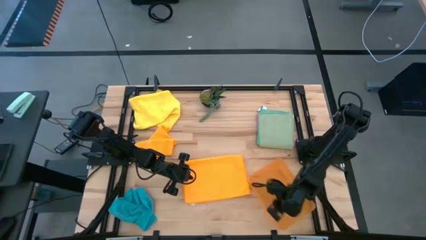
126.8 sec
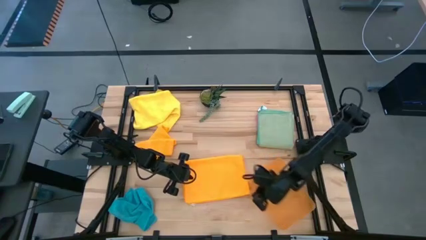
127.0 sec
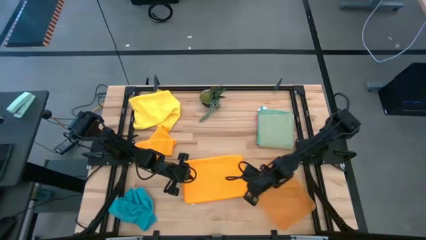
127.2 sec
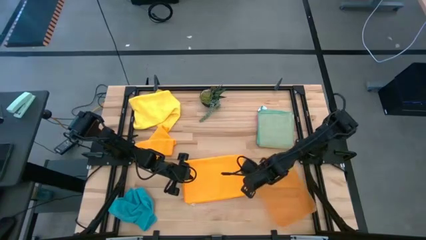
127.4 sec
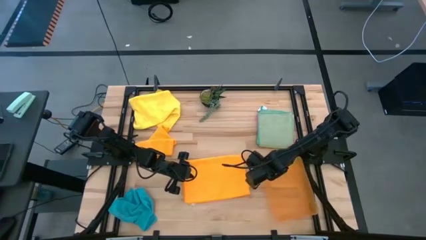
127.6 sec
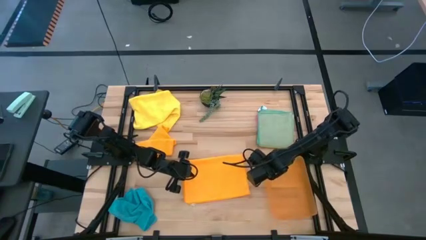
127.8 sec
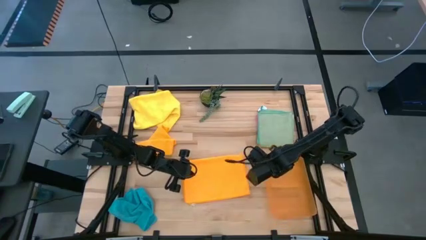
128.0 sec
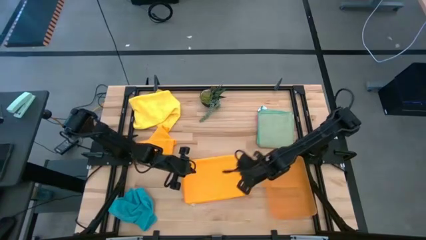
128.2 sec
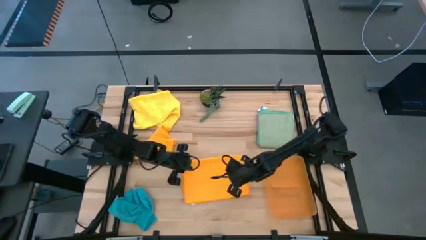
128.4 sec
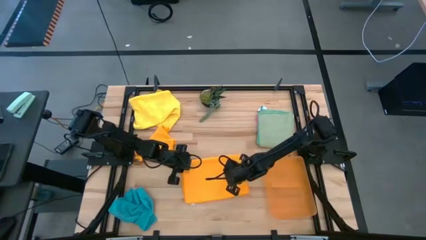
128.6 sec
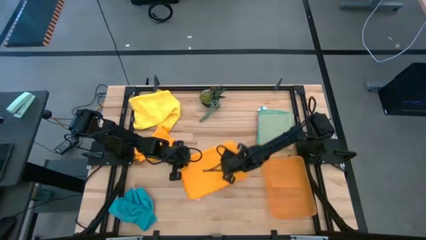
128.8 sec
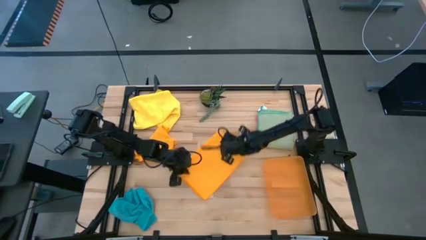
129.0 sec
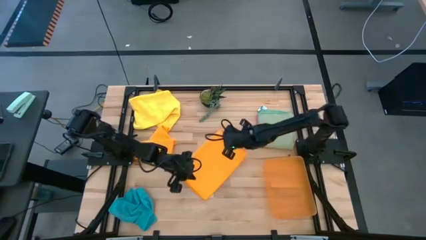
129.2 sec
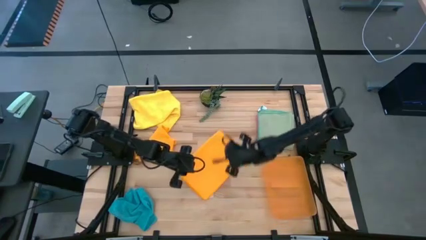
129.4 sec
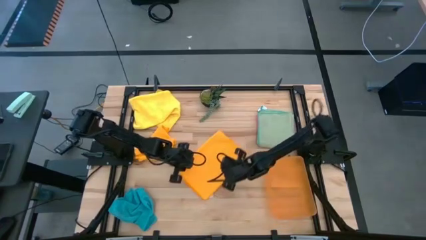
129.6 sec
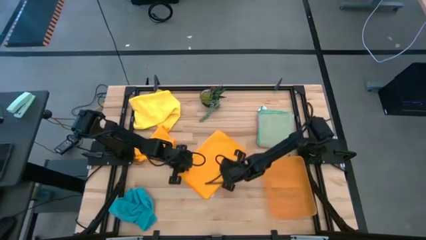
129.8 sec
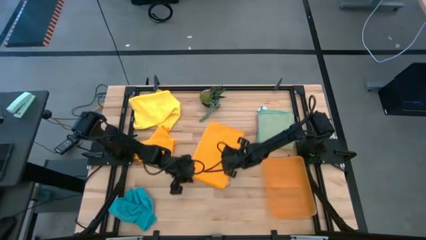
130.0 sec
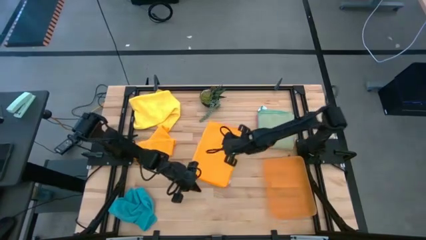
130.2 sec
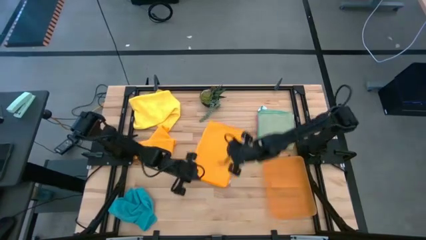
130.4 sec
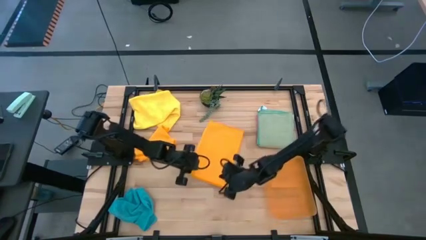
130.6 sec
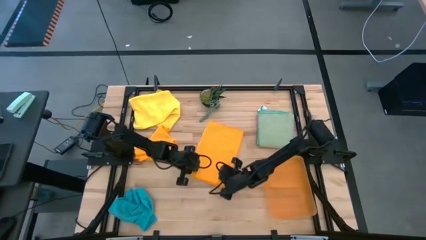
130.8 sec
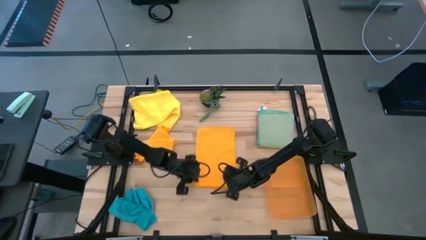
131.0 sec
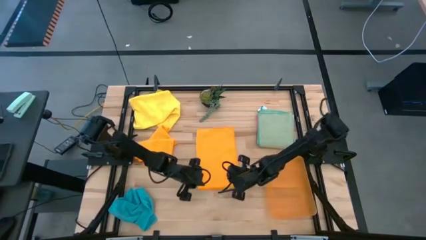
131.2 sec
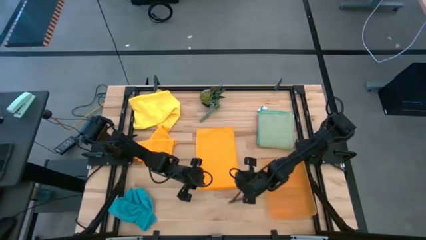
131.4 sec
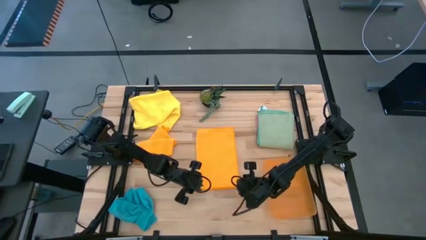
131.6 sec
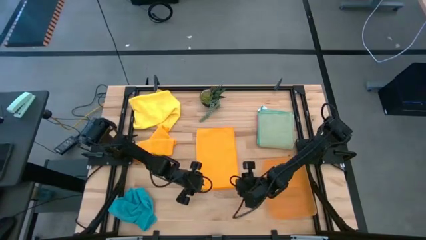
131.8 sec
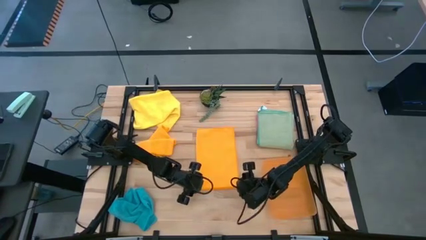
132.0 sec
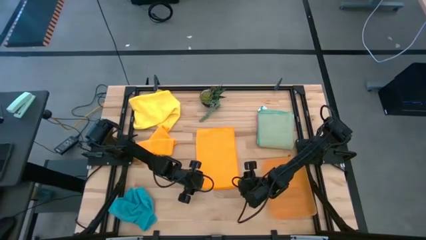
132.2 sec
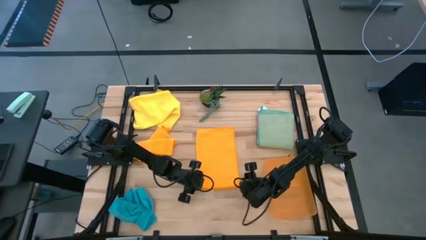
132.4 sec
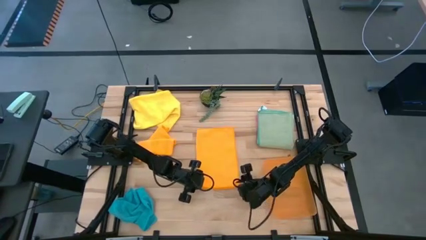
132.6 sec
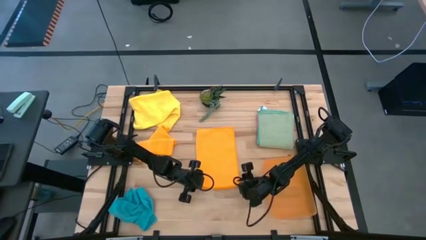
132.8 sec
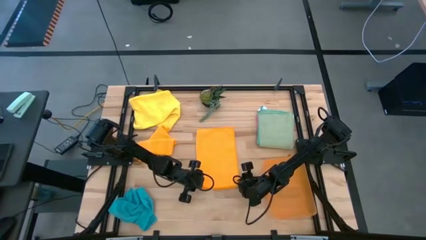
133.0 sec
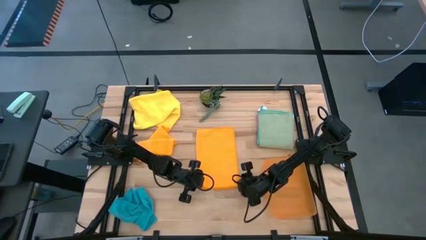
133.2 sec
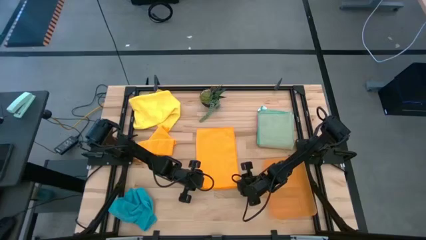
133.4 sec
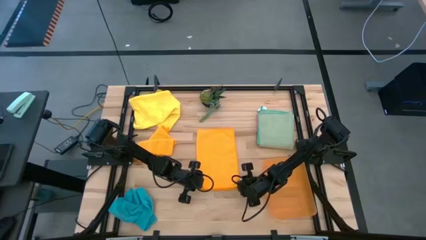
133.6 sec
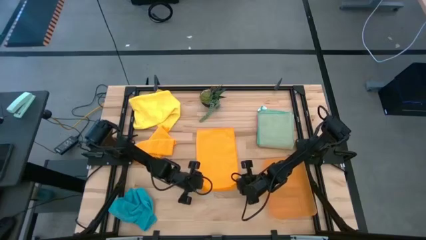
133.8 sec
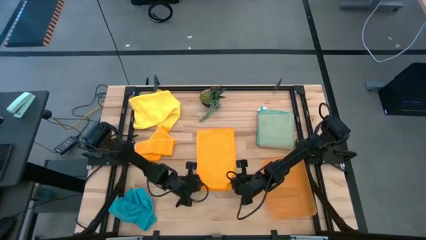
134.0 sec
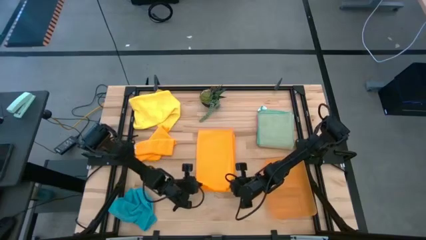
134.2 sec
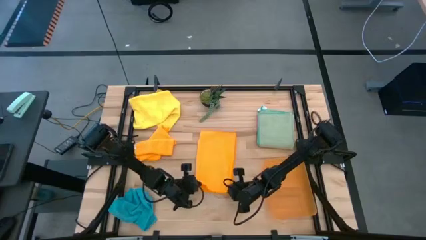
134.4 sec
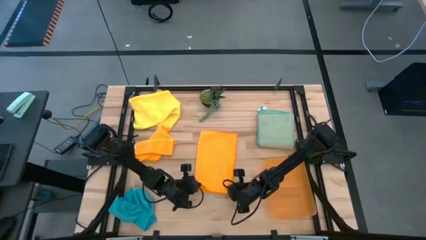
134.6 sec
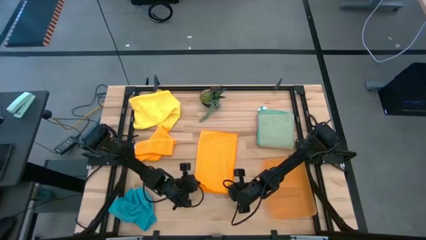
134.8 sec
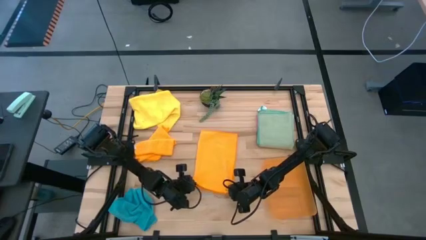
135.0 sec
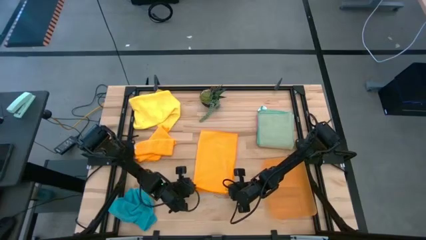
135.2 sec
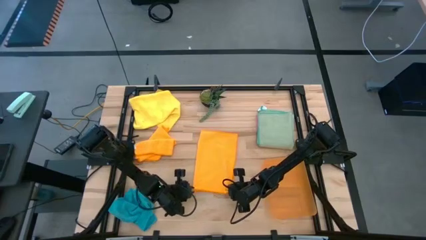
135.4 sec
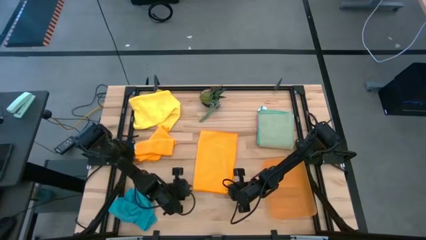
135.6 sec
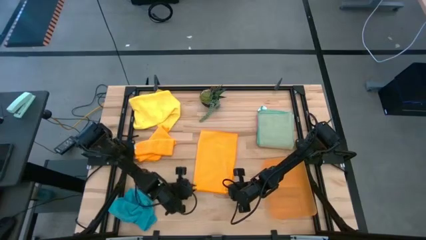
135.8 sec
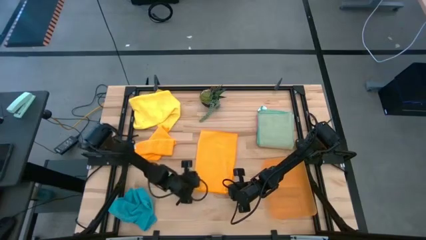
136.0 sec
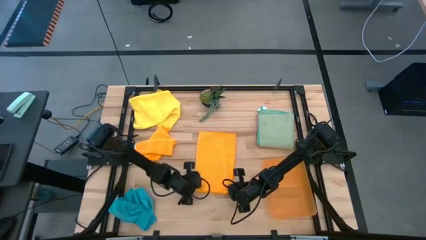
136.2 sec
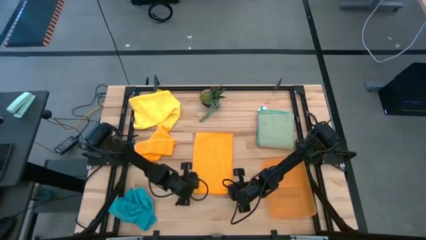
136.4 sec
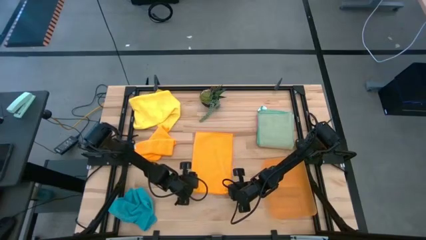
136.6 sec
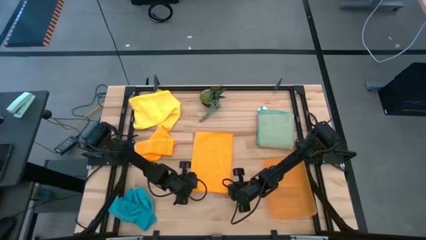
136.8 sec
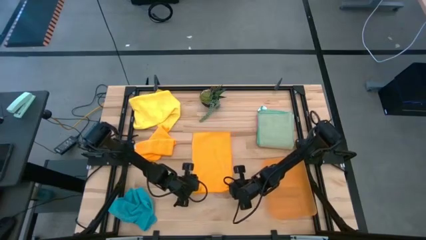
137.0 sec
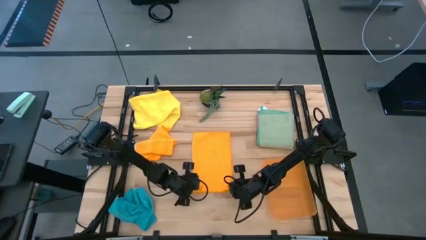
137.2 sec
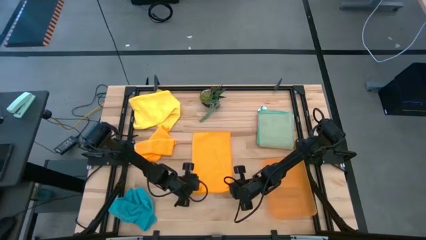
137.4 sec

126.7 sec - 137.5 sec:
Task: Fold microfiber towels
Fold the right orange microfiber towel

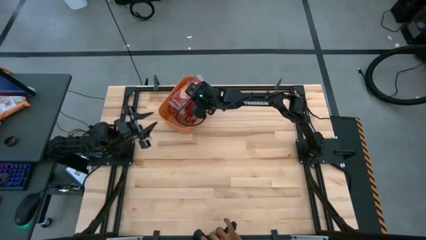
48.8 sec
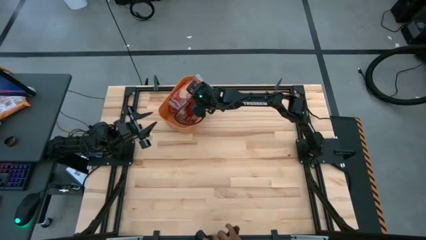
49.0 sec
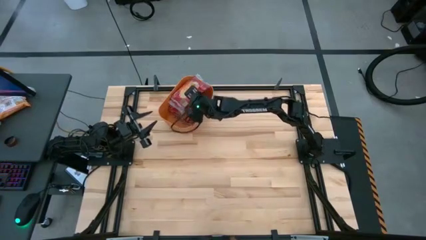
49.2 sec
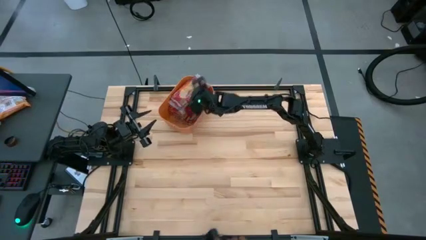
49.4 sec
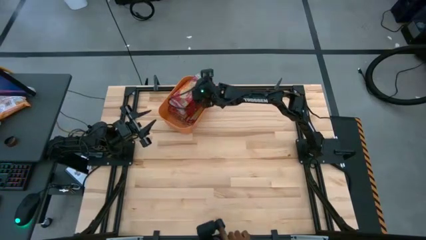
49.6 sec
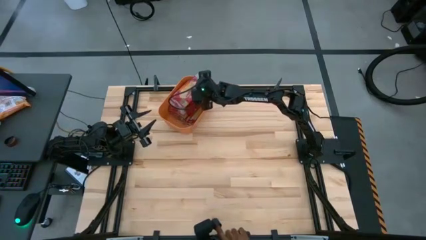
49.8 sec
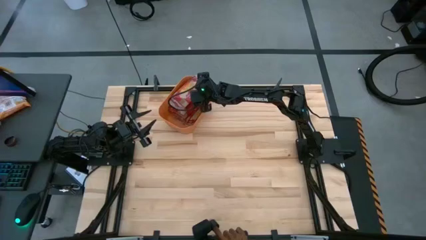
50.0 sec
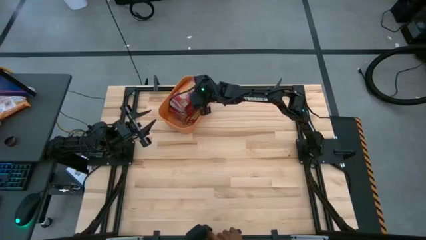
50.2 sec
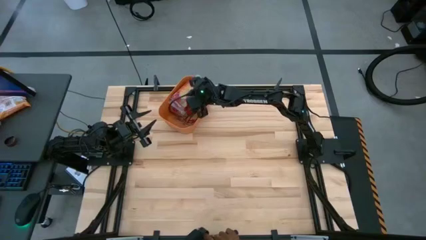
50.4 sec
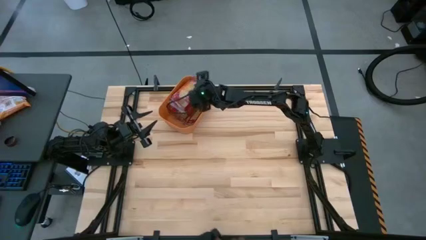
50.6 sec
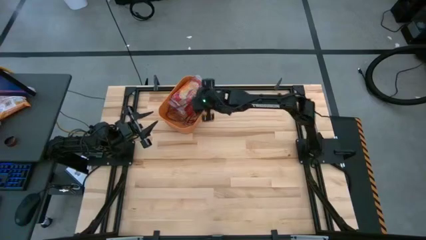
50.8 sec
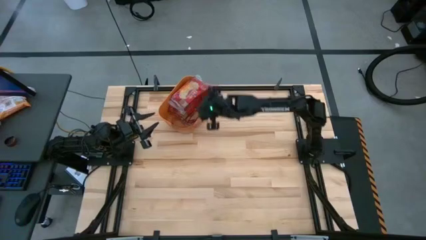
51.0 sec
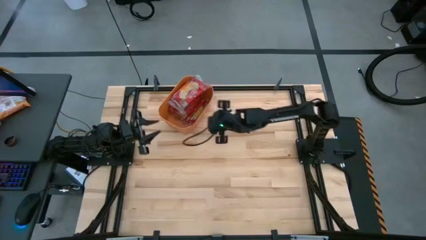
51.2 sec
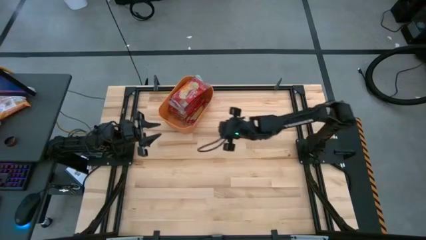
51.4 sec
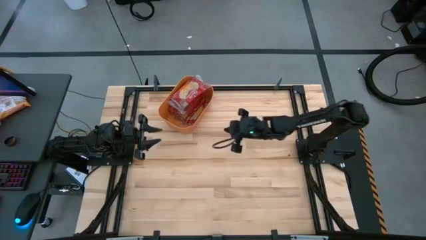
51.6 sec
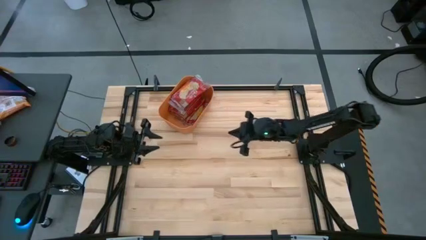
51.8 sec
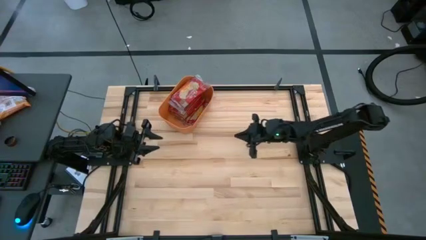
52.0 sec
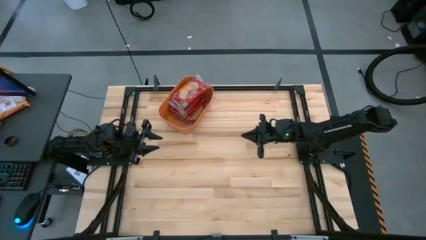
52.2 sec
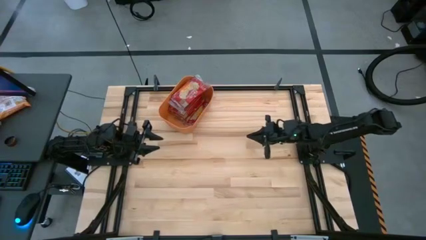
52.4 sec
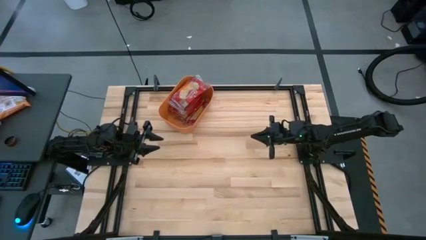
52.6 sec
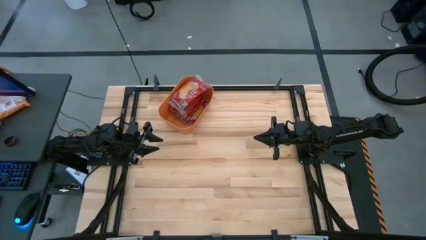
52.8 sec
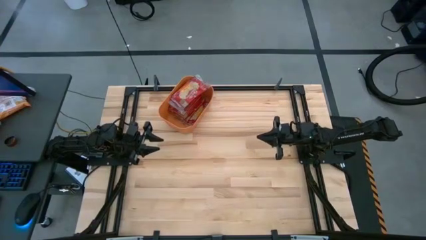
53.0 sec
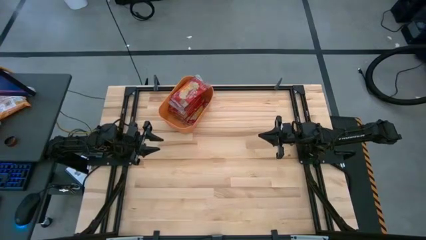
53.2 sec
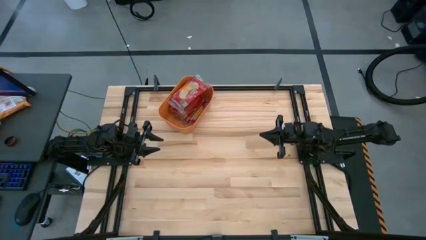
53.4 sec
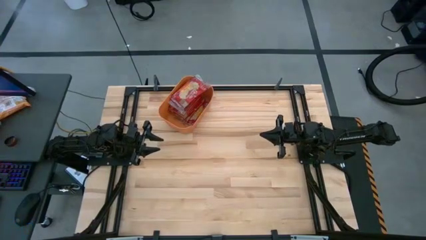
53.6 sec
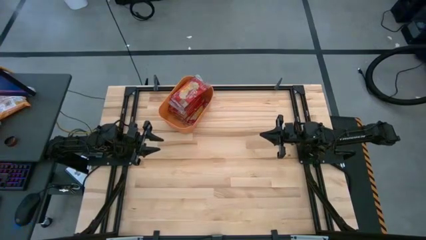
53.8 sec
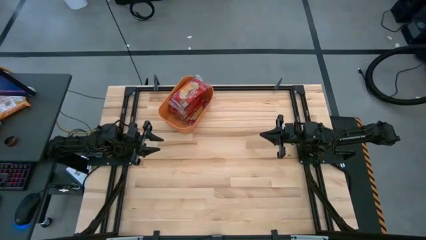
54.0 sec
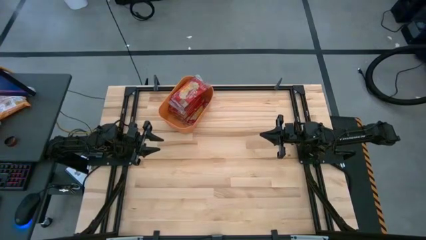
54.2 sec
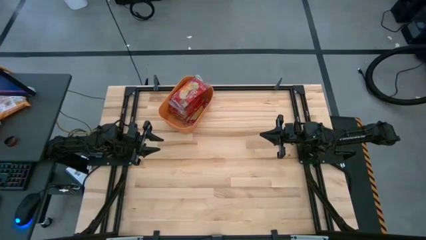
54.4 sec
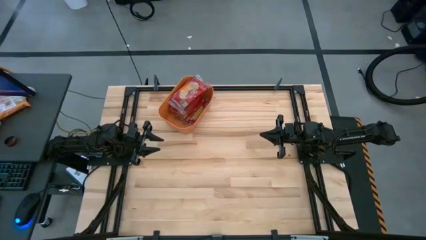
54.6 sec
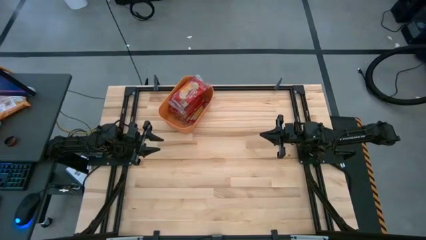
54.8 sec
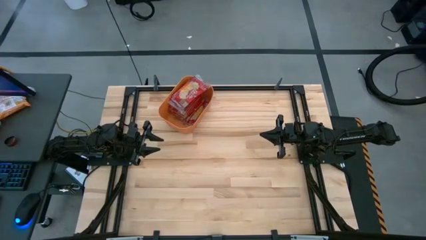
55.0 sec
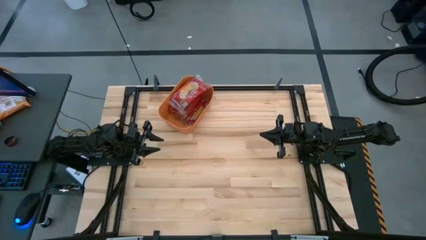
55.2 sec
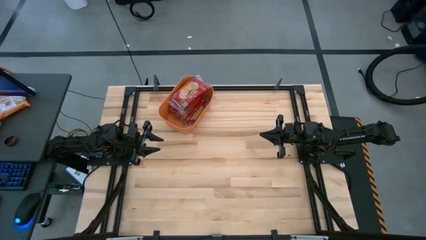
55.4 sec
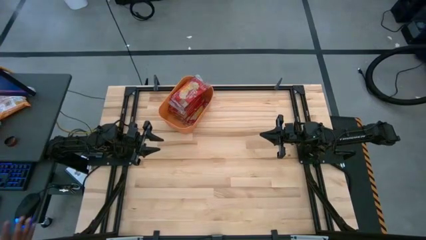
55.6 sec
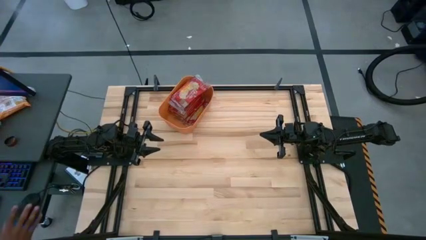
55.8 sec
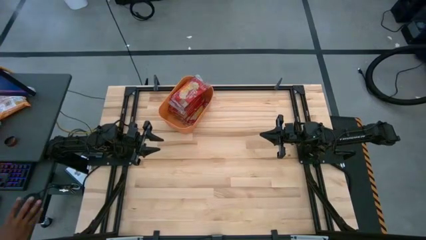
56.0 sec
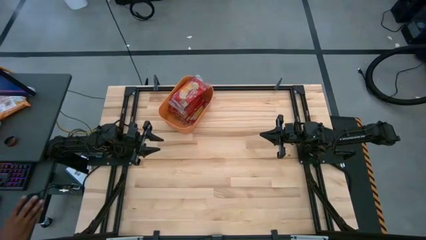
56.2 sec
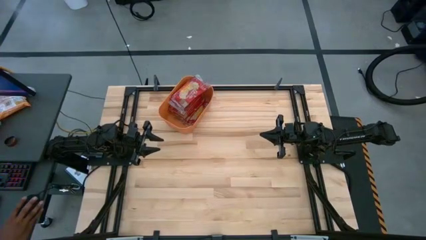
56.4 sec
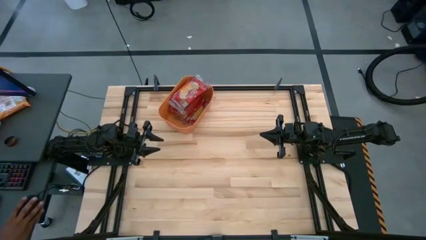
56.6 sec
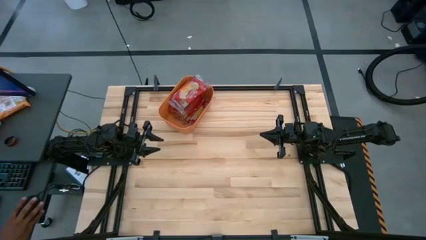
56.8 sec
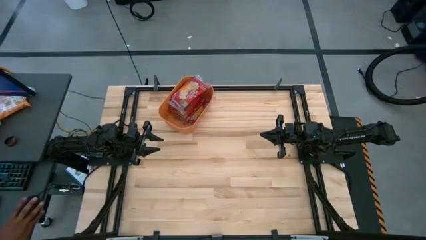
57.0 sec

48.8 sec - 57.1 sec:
Task: Sort popcorn bags into baskets
Return to Home Position
